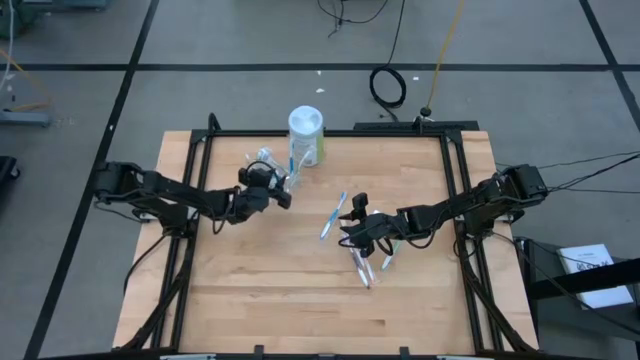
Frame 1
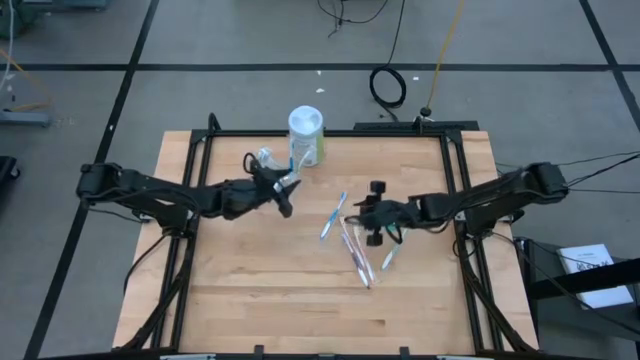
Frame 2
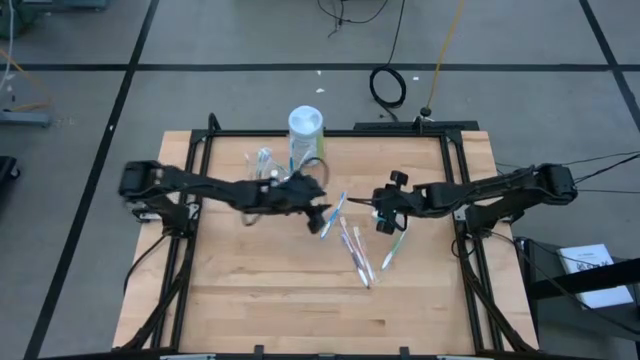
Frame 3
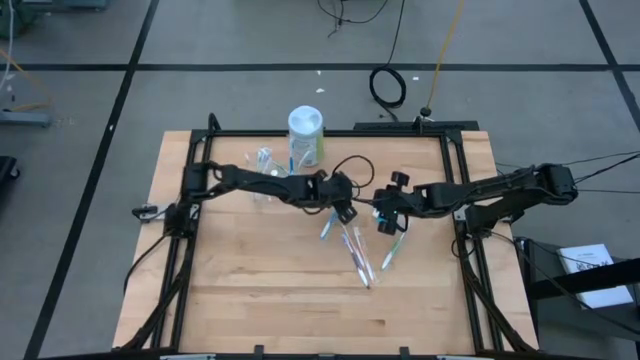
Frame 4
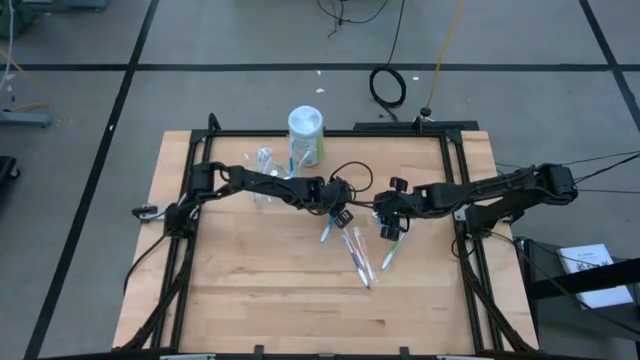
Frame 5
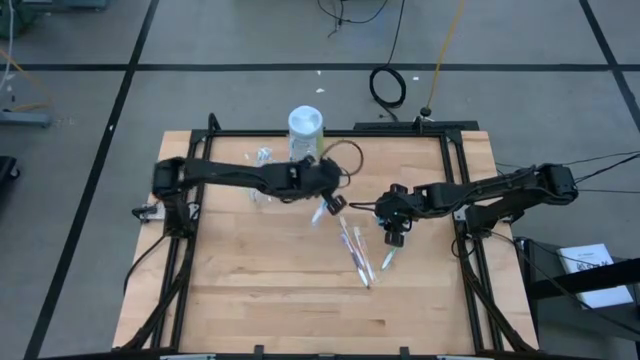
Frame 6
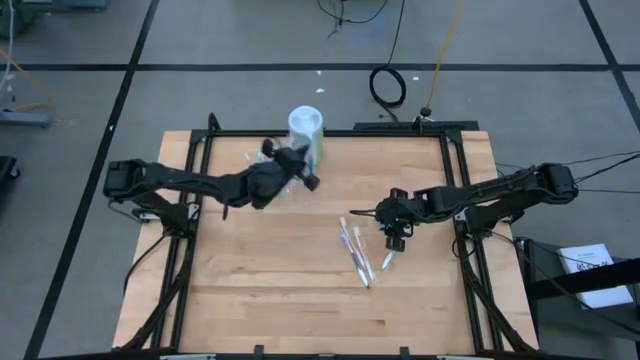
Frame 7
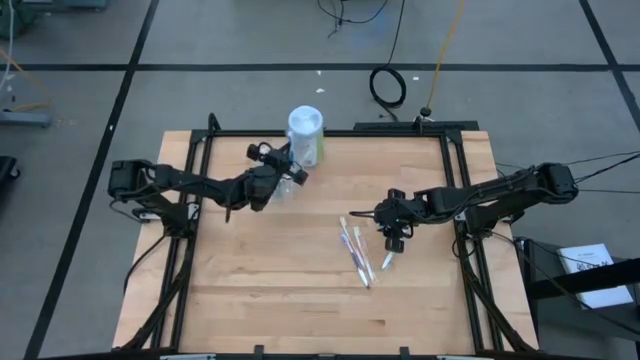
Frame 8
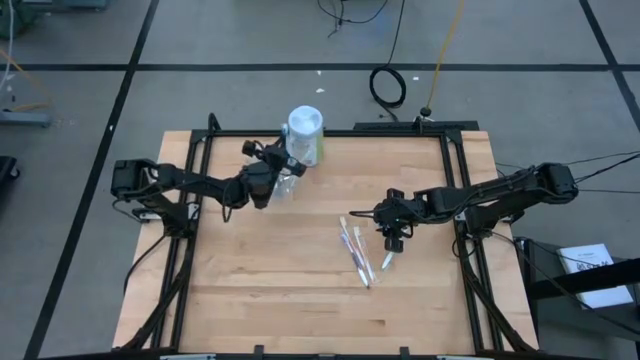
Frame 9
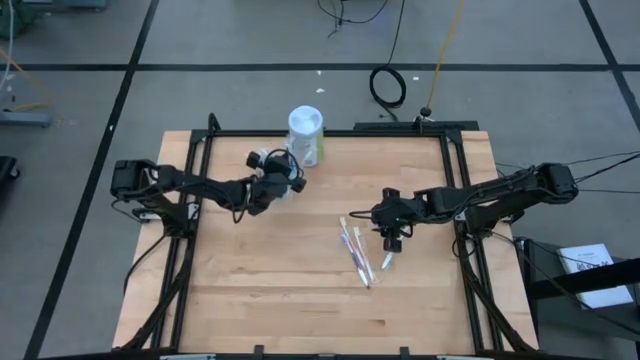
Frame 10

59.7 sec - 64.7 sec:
Task: Pick & Place toothbrushing station
Put the blue toothbrush into the transparent organizer

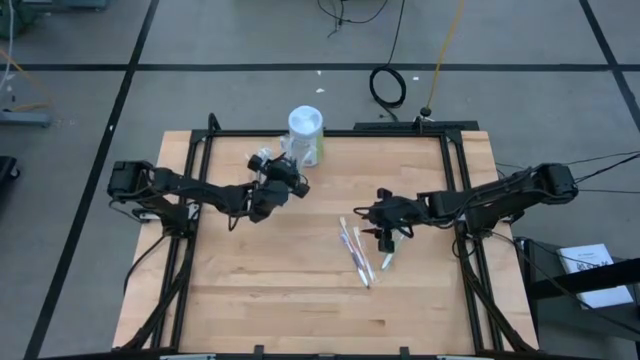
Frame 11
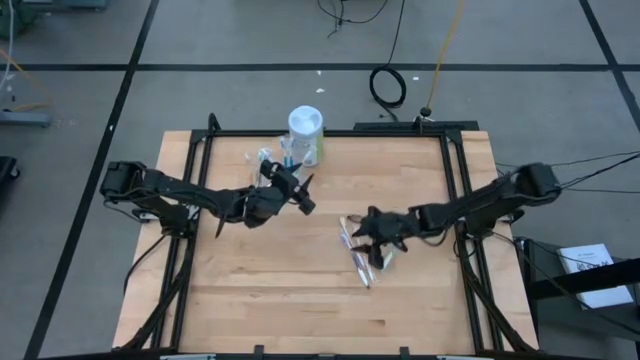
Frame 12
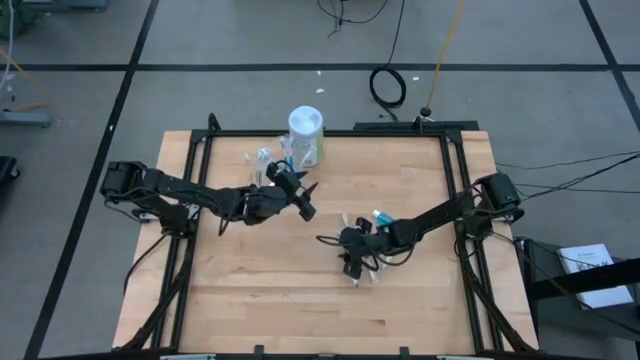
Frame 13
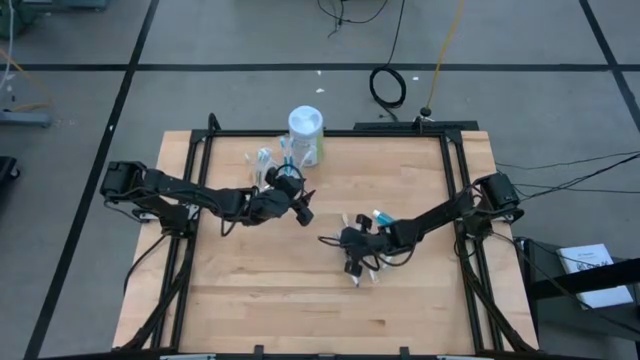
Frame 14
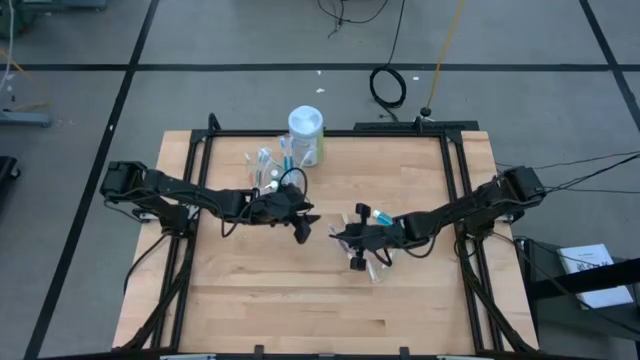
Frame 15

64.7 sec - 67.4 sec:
Put the purple toothbrush into the transparent organizer

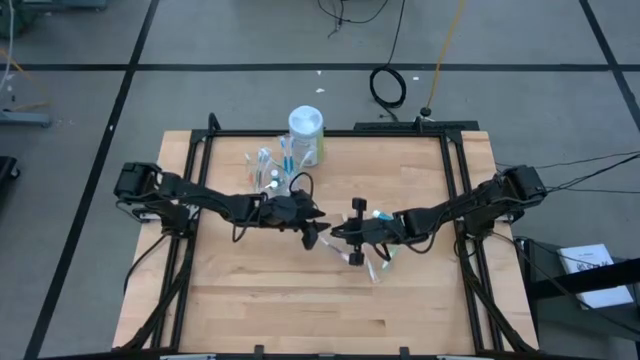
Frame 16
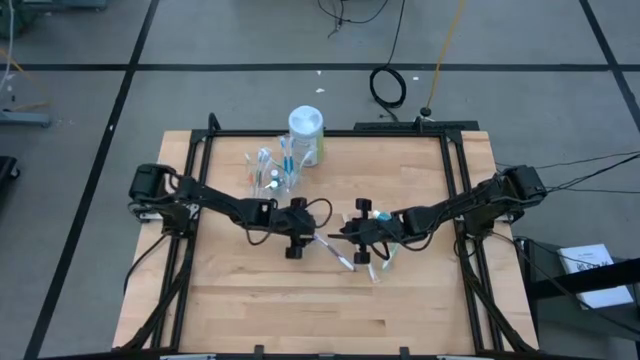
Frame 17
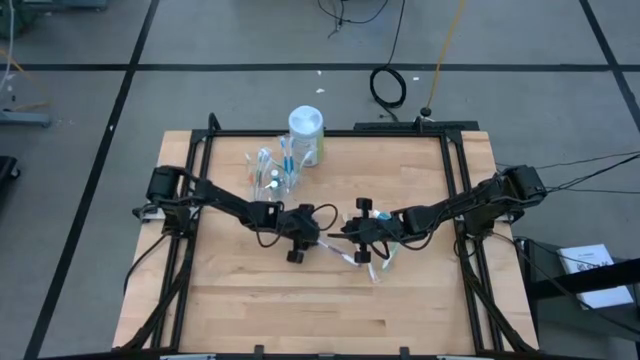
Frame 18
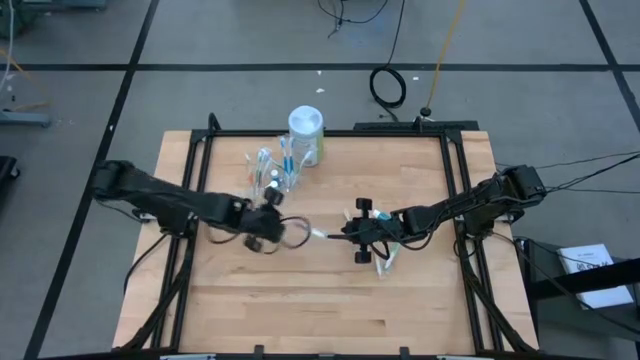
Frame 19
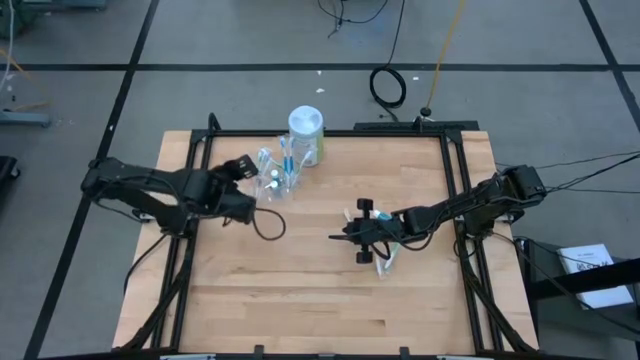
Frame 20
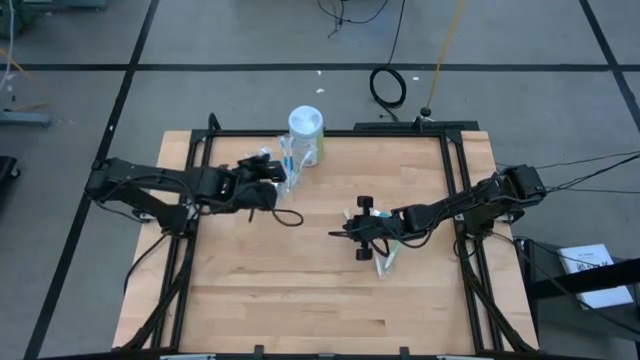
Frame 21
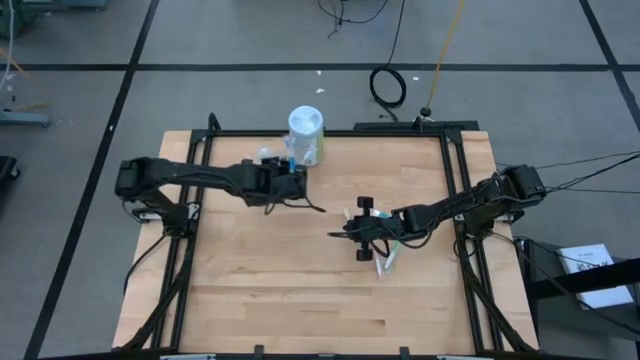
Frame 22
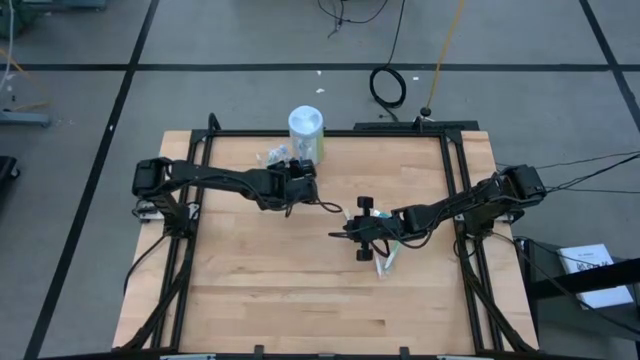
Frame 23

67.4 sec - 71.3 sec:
Put the purple toothbrush into the transparent organizer

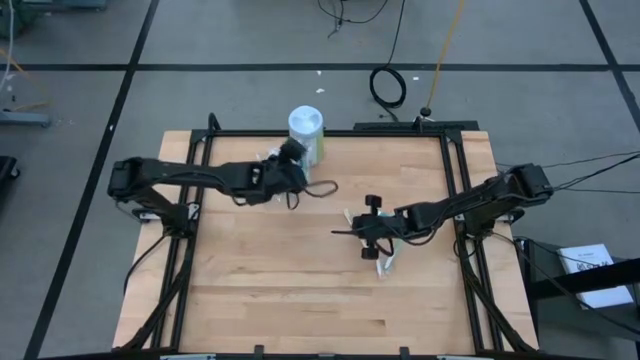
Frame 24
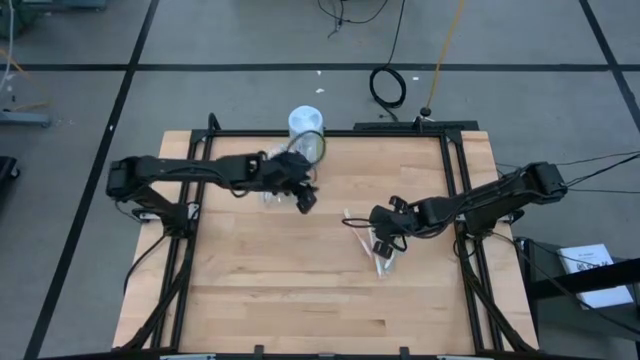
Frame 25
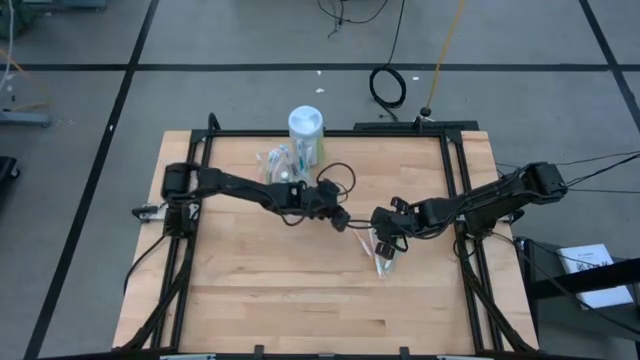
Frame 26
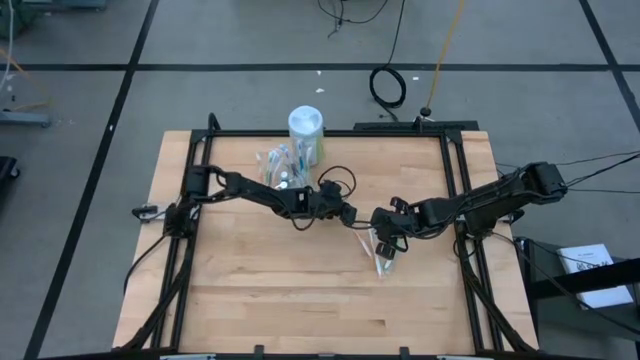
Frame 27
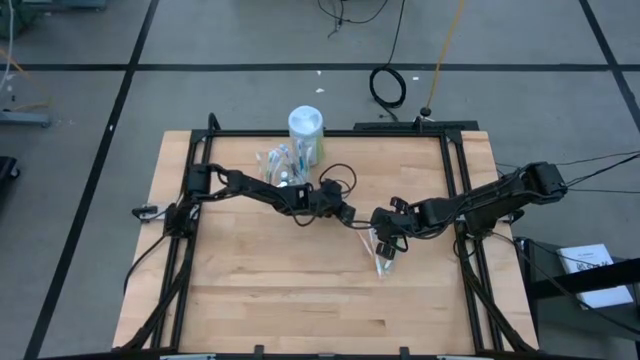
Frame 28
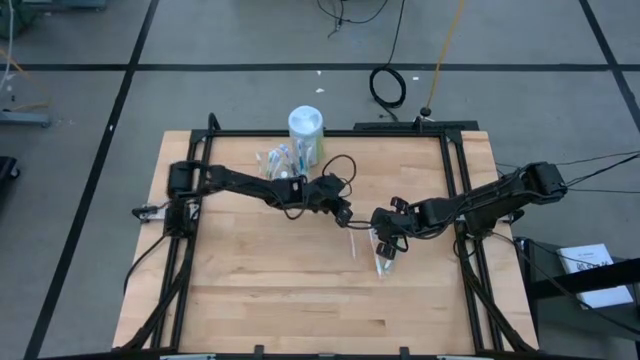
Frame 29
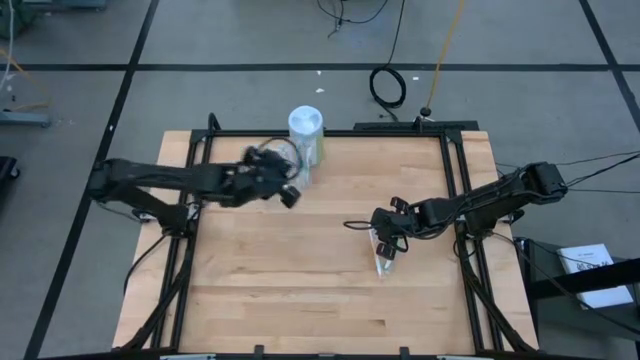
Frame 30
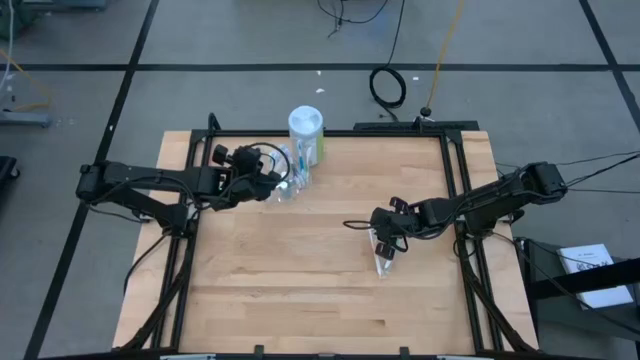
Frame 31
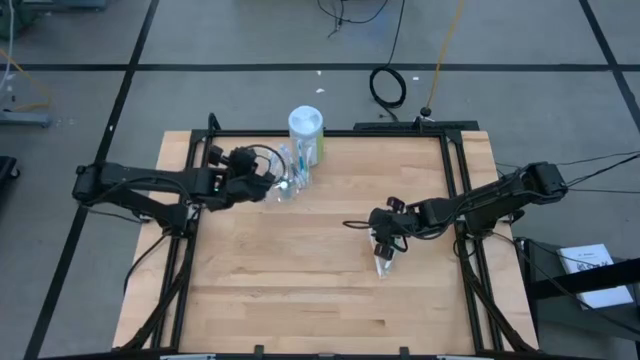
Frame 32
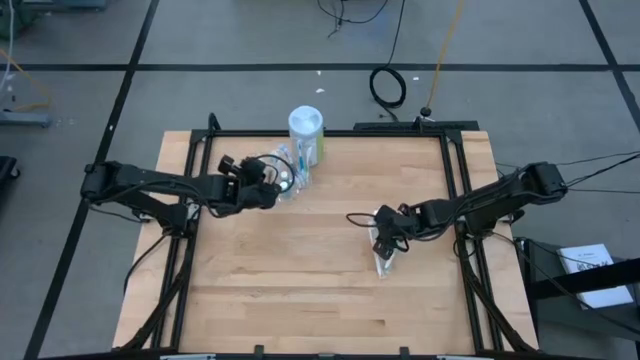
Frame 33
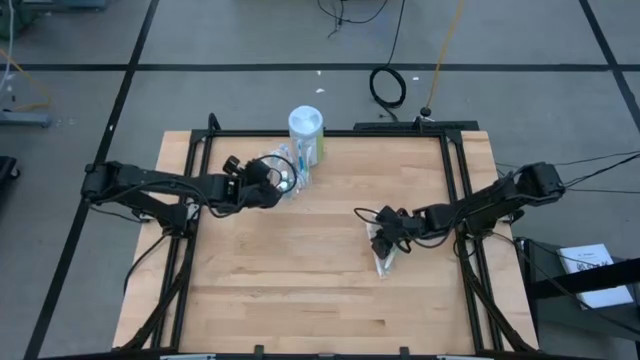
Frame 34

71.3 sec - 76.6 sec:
Put the left orange toothbrush into the transparent organizer

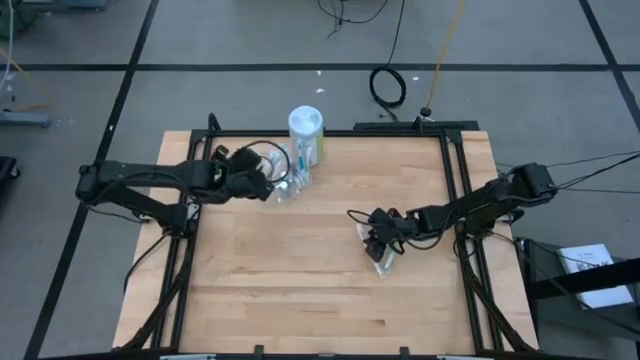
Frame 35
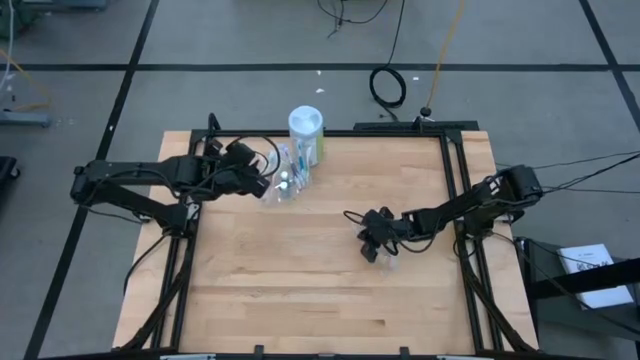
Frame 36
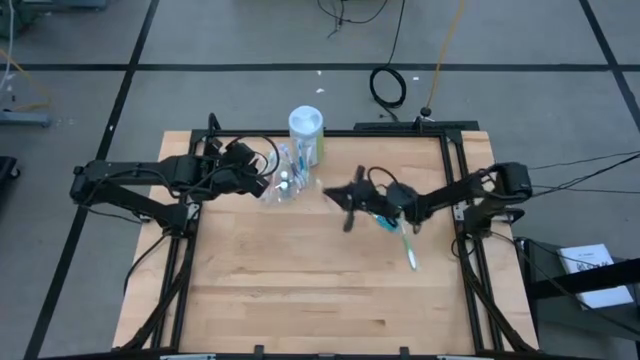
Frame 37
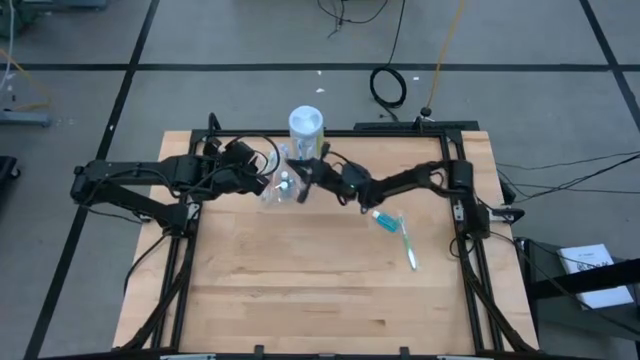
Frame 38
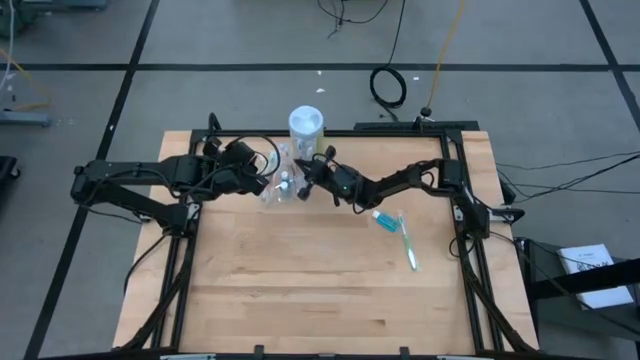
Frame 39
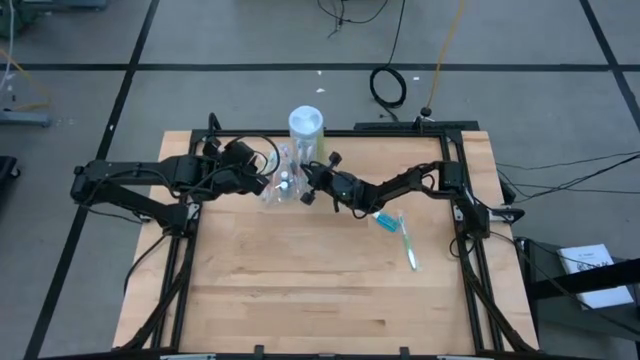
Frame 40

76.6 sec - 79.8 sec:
Put the orange toothbrush into the transparent organizer

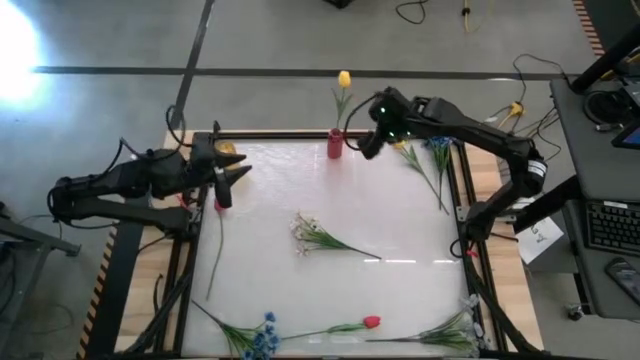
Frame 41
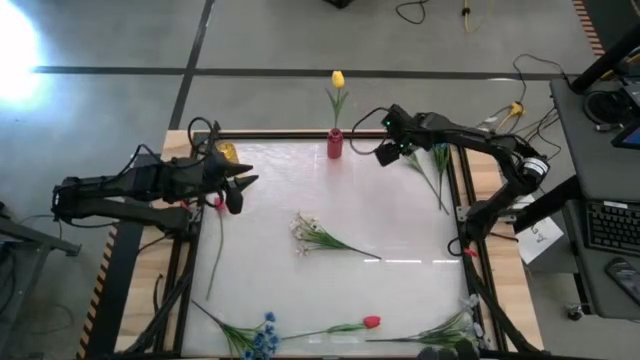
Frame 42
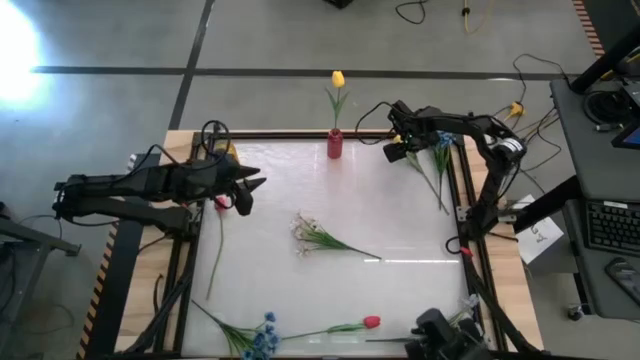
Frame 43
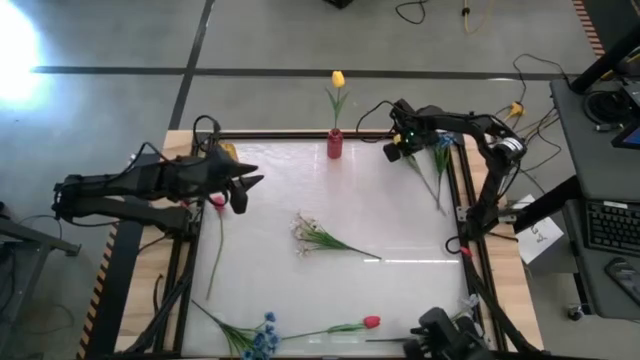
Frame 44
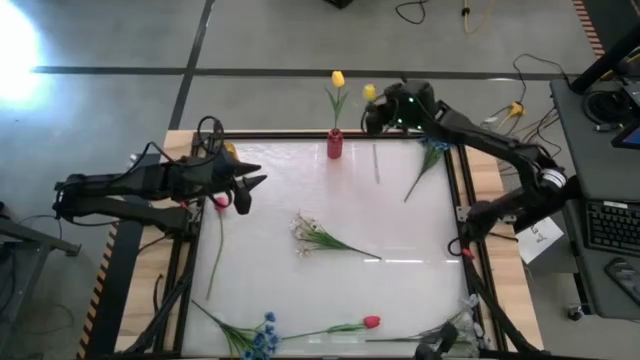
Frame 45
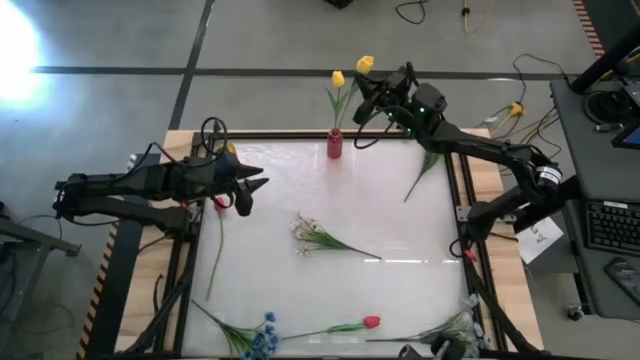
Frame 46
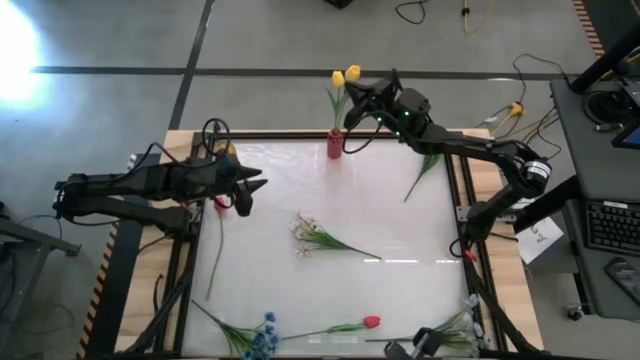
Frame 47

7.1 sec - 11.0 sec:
Task: Sort flowers into vase by color
Put the yellow flower into the red vase
